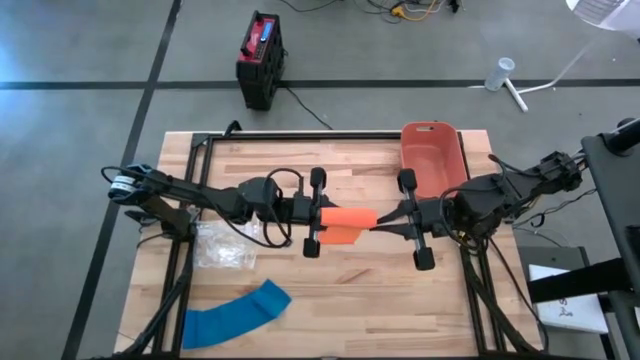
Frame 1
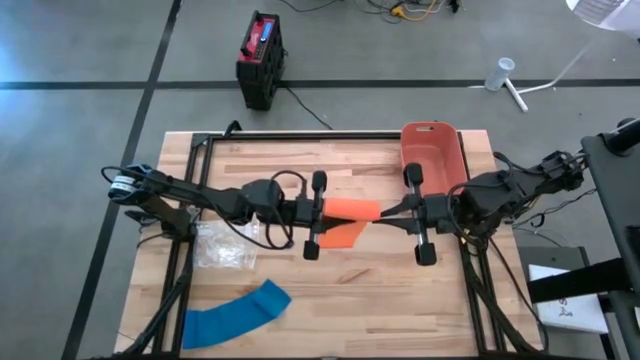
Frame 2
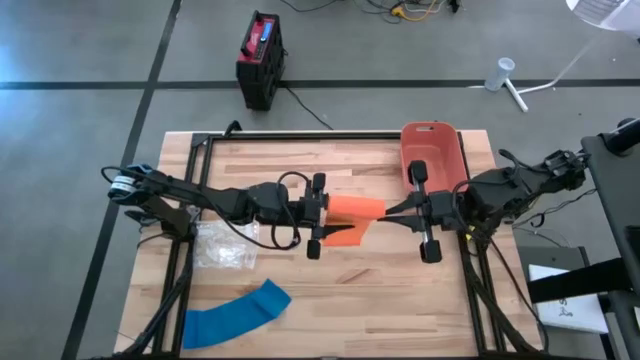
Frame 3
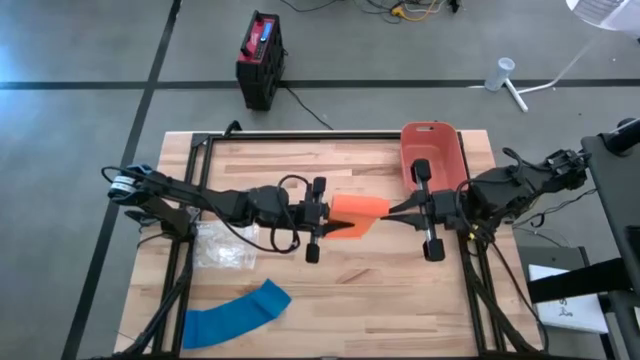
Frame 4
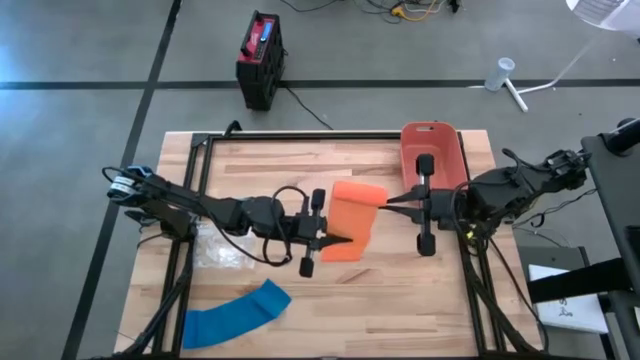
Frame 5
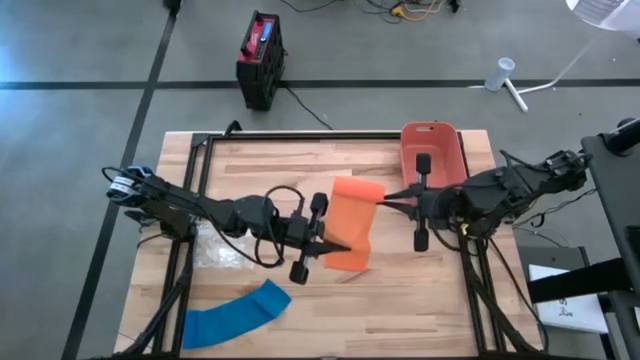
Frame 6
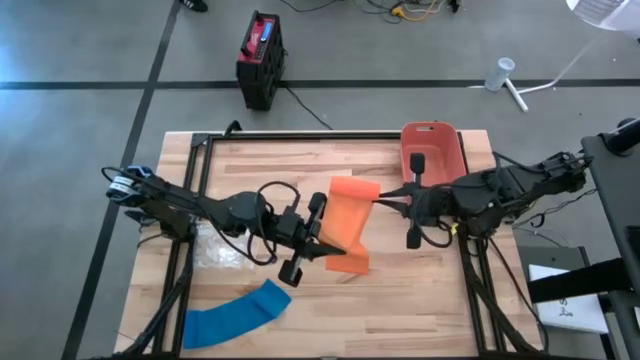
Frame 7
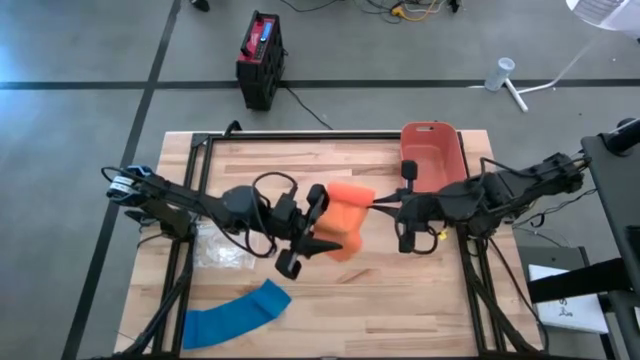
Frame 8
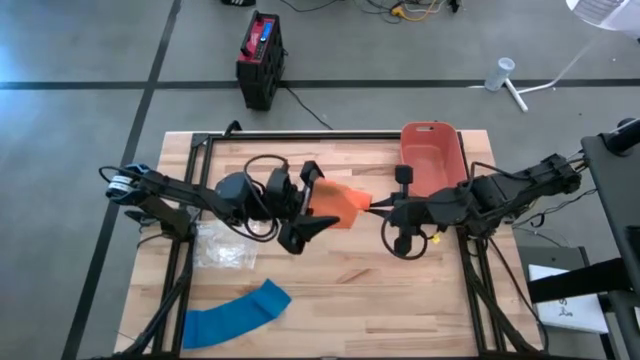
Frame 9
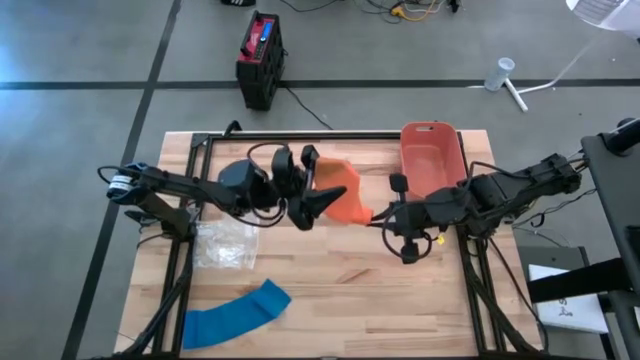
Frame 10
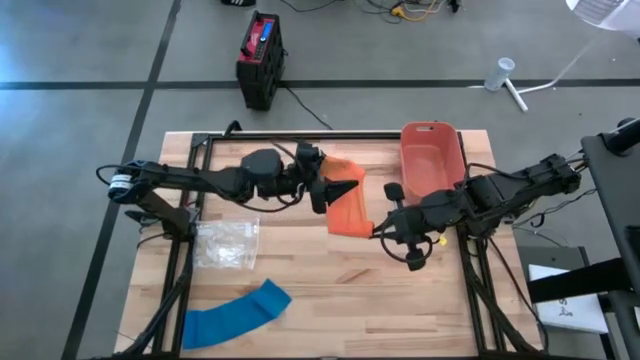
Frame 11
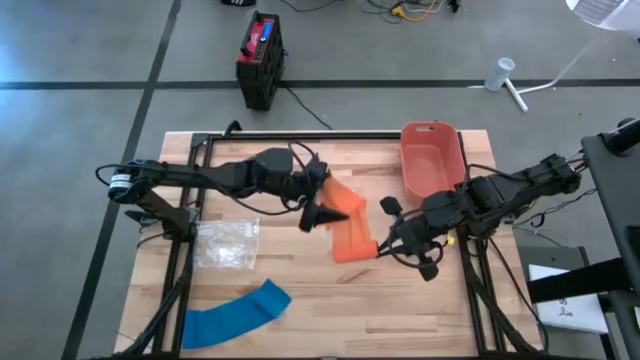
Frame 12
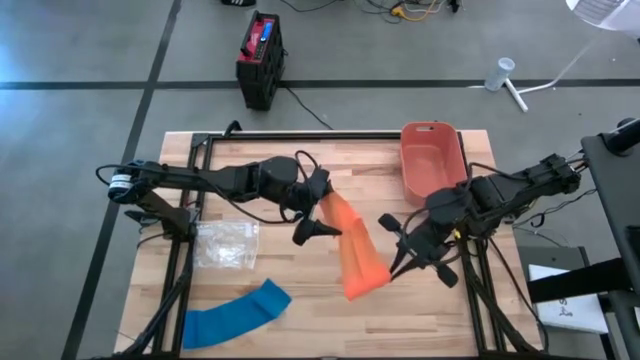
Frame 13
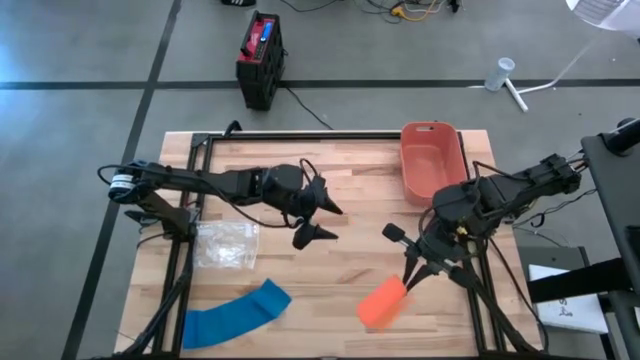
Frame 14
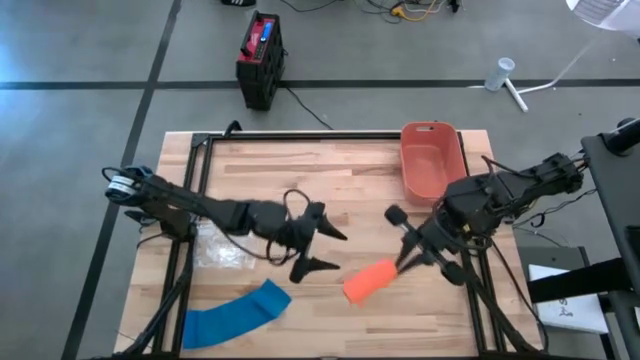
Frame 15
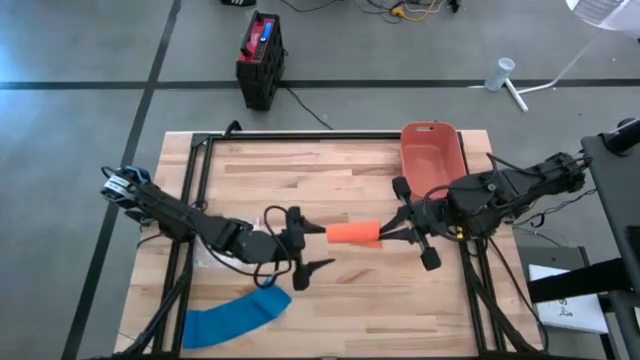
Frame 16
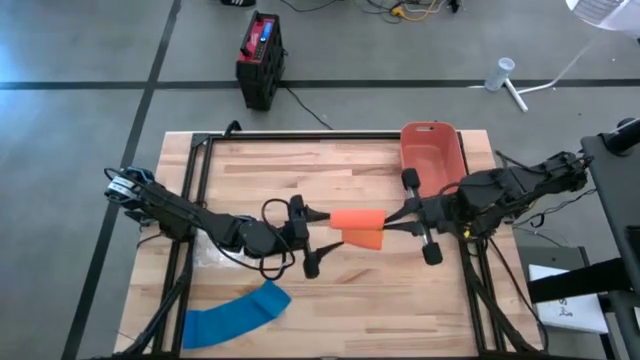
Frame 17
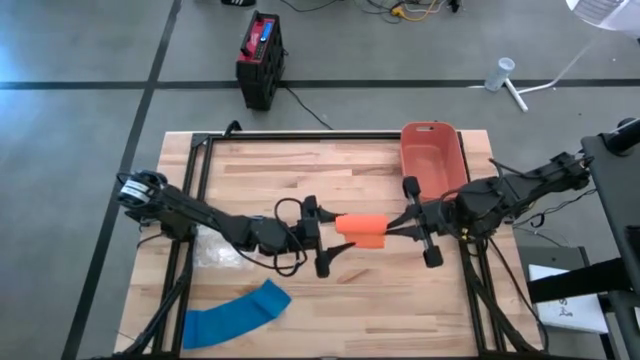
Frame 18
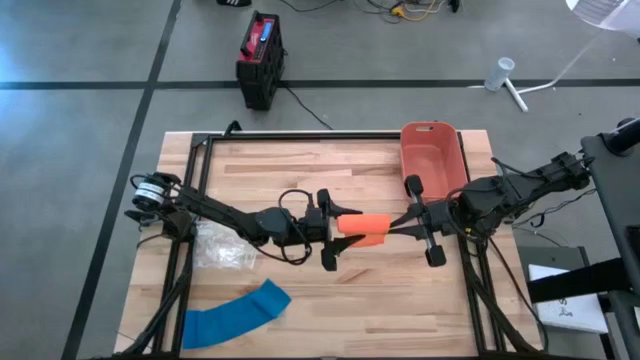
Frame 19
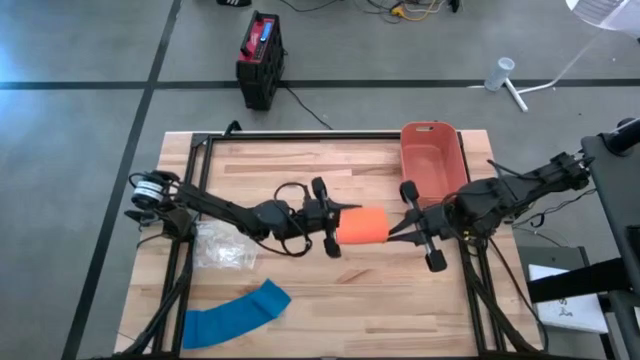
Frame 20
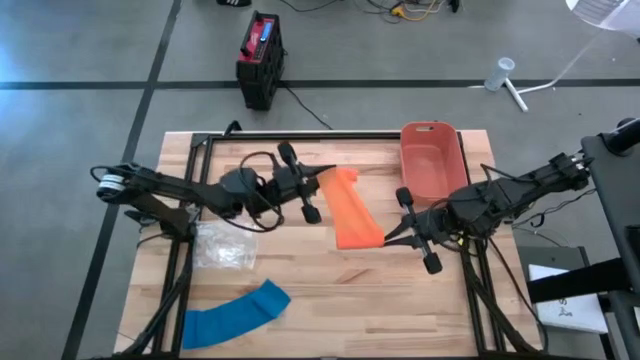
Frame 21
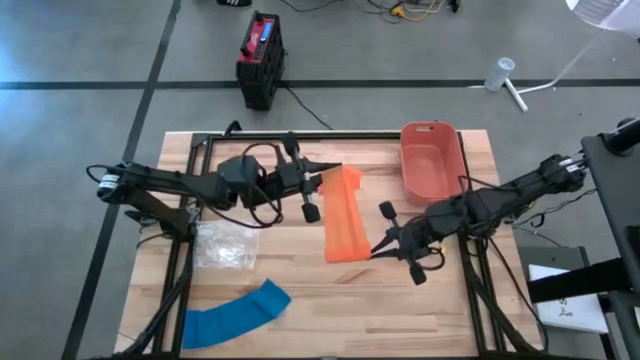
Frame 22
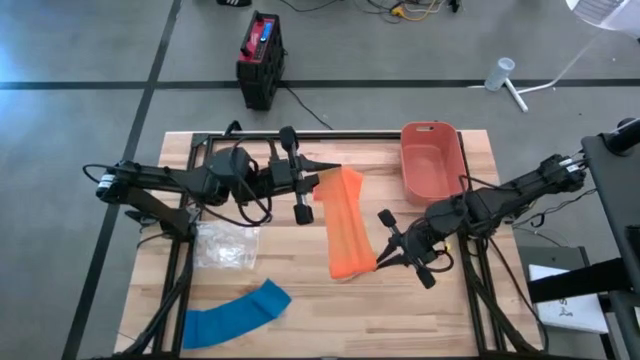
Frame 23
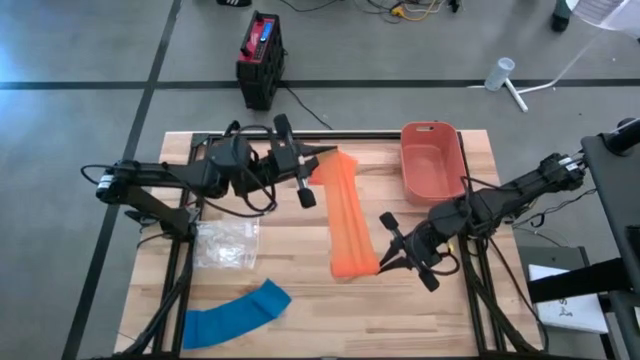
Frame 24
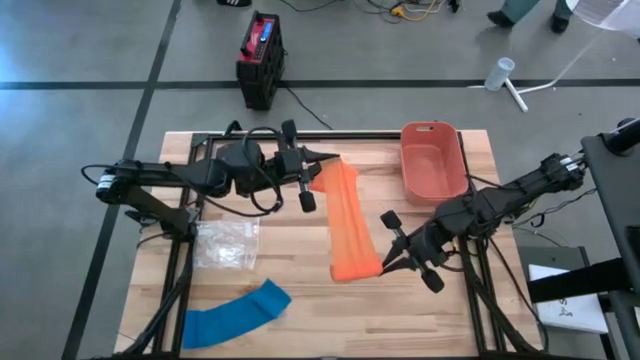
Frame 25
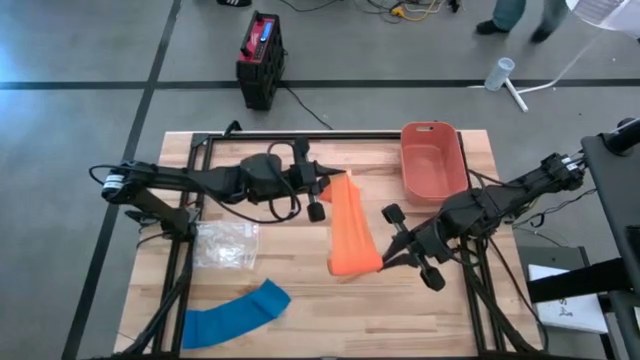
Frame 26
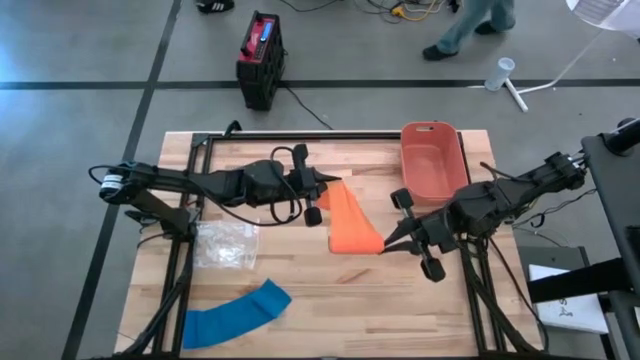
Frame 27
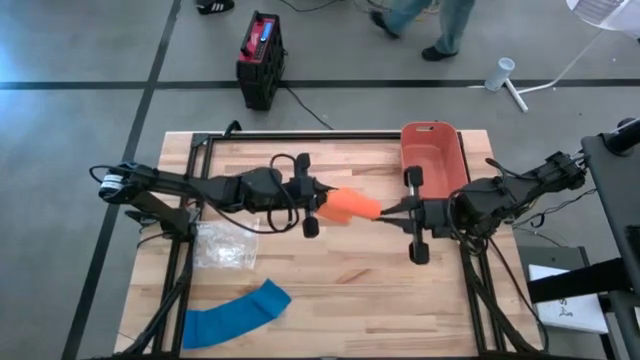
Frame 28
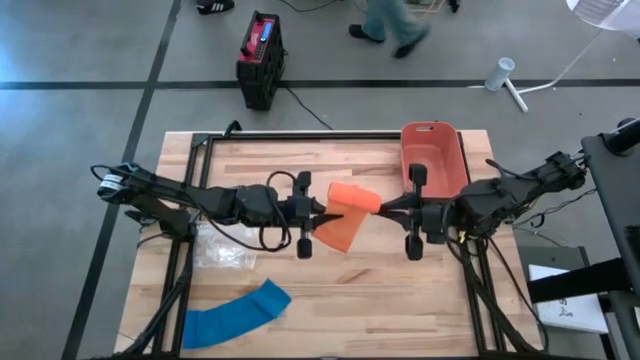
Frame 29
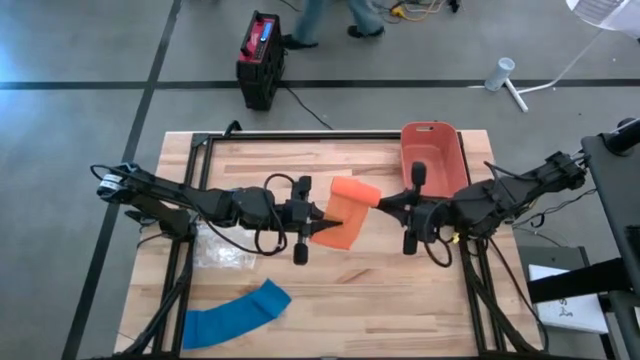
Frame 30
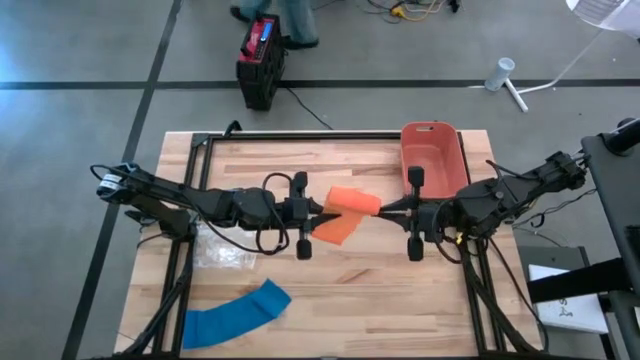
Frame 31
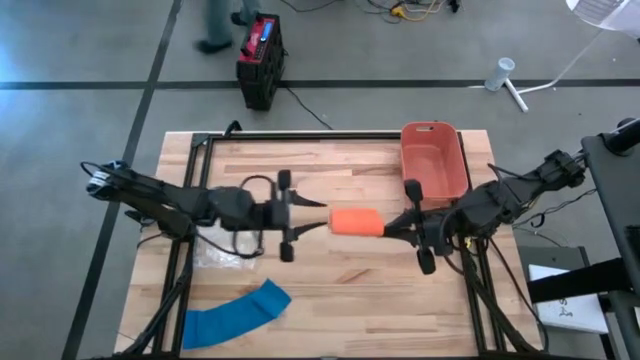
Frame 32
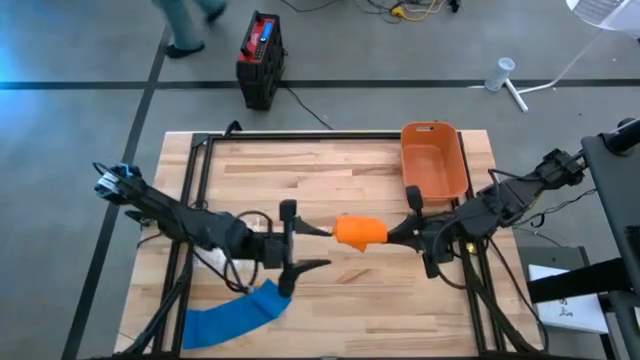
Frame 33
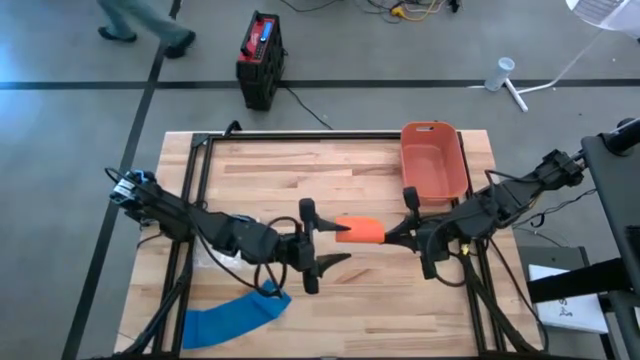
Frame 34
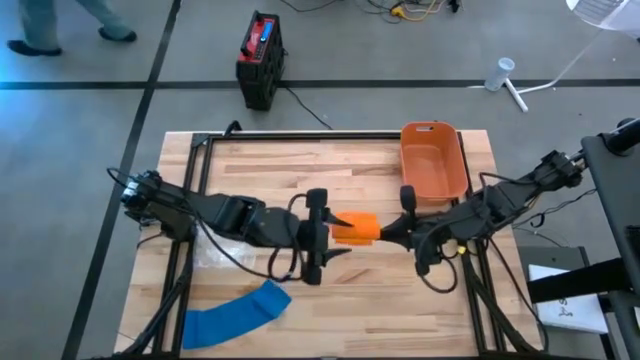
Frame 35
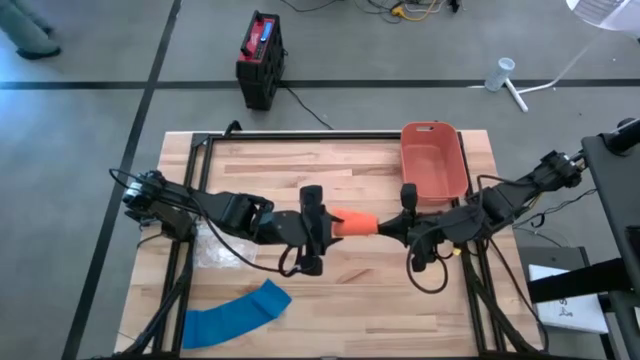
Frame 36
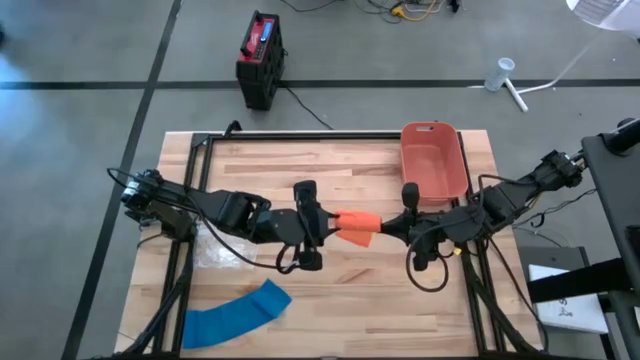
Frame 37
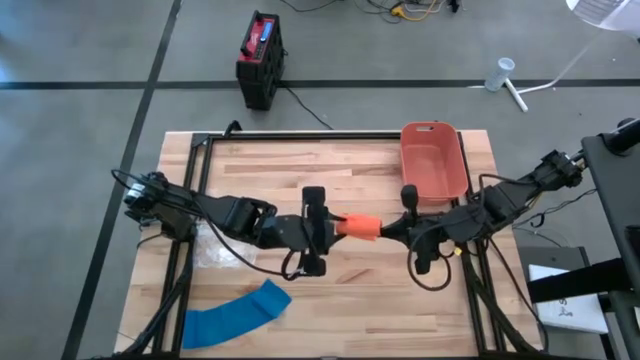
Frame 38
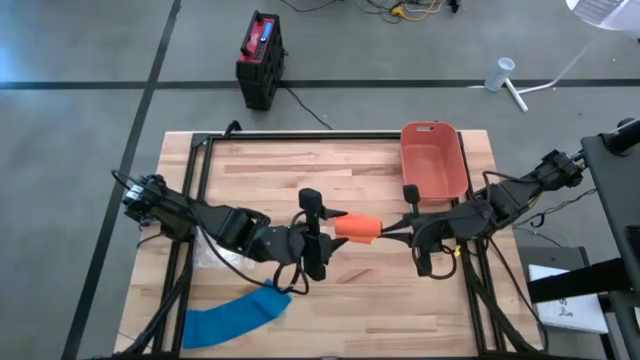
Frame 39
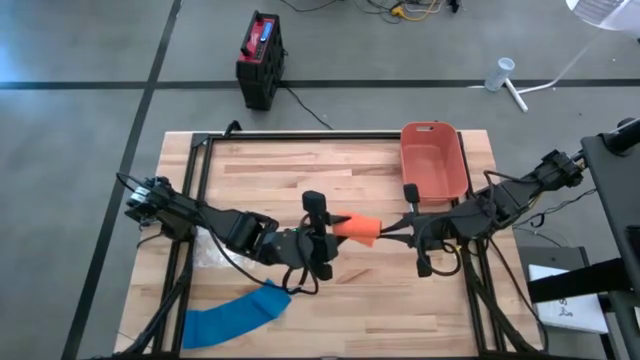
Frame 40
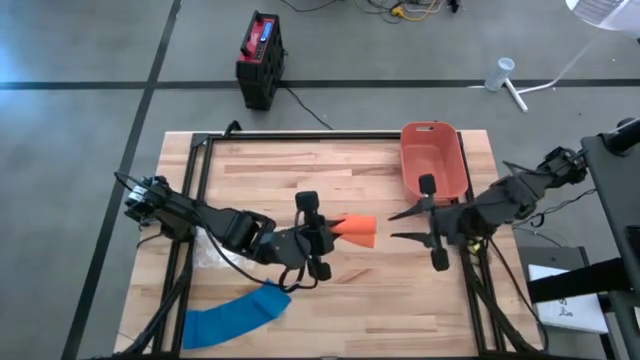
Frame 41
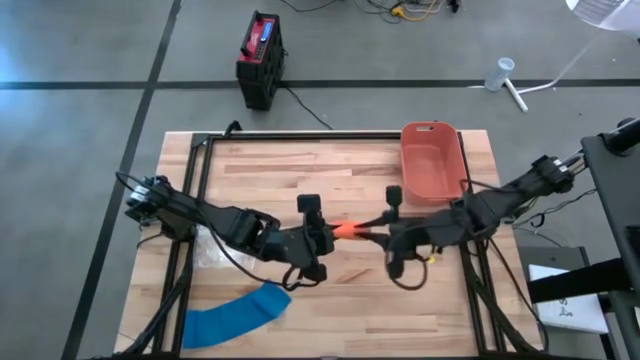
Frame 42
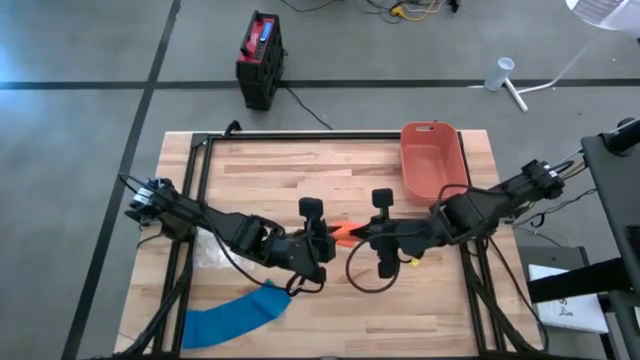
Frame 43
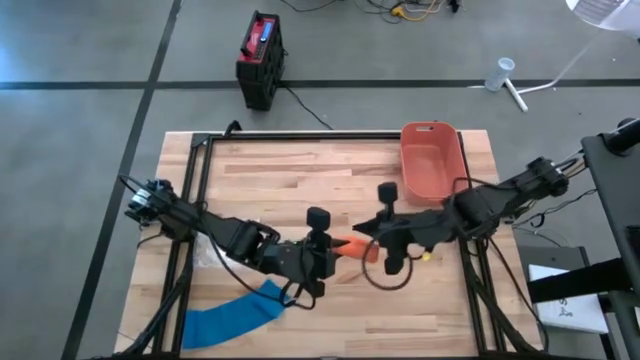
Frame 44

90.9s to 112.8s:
Task: Roll bandage
Roll the orange bandage
